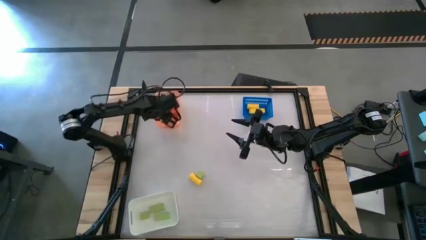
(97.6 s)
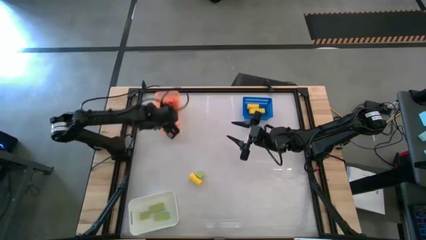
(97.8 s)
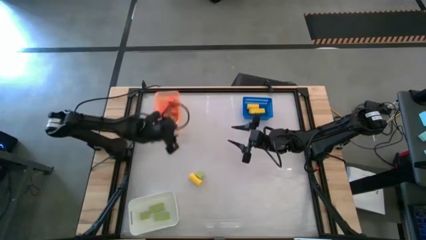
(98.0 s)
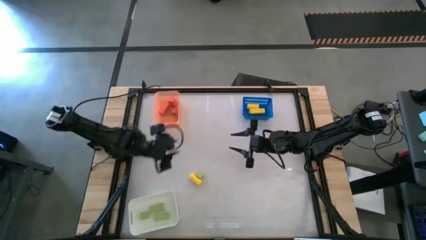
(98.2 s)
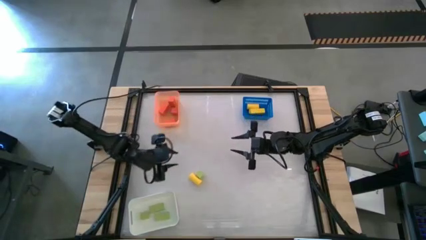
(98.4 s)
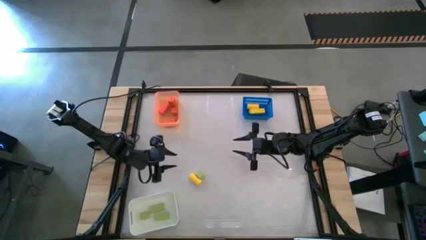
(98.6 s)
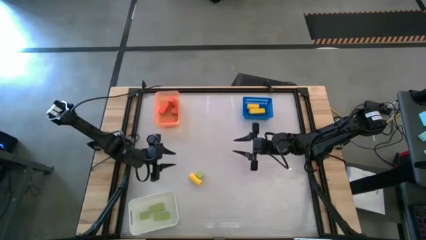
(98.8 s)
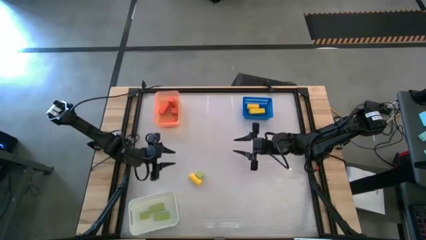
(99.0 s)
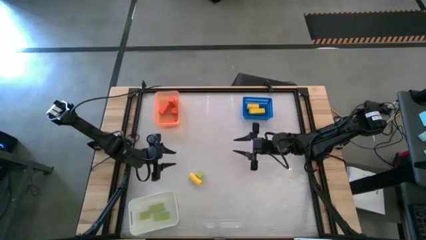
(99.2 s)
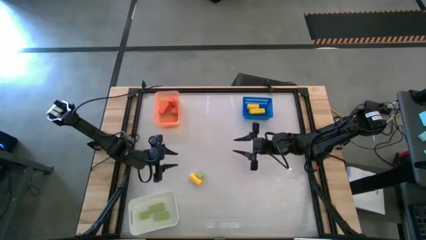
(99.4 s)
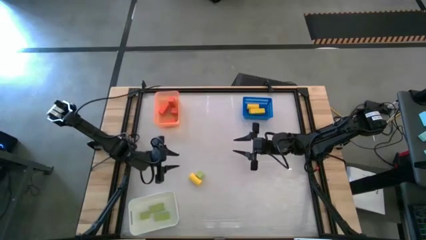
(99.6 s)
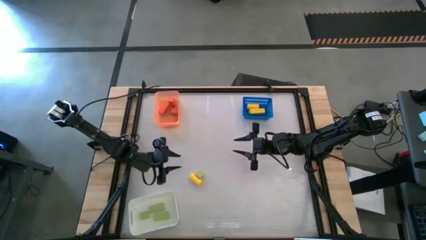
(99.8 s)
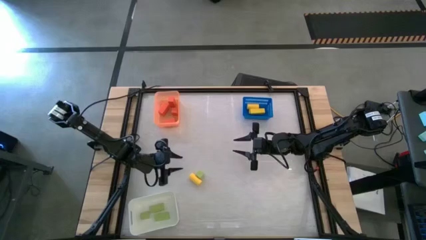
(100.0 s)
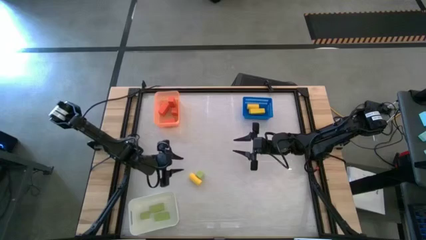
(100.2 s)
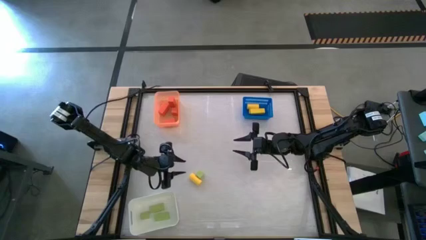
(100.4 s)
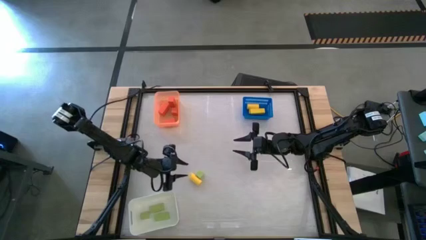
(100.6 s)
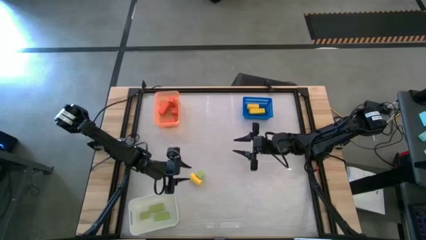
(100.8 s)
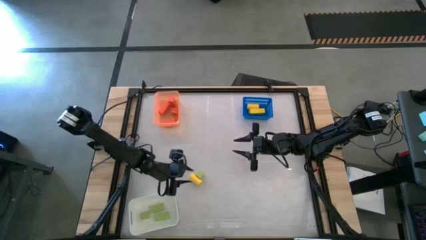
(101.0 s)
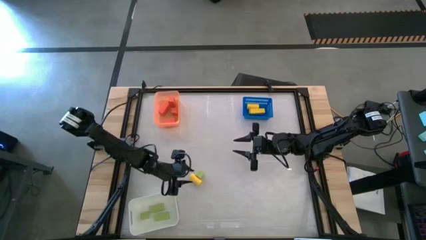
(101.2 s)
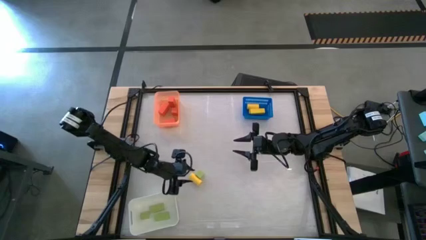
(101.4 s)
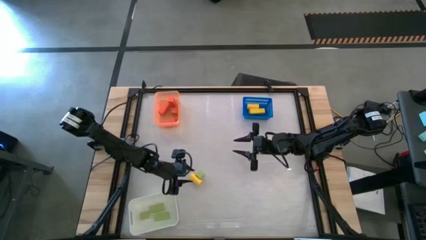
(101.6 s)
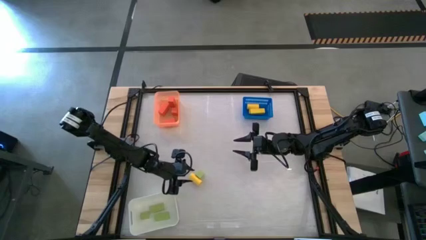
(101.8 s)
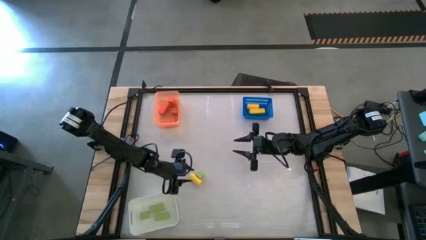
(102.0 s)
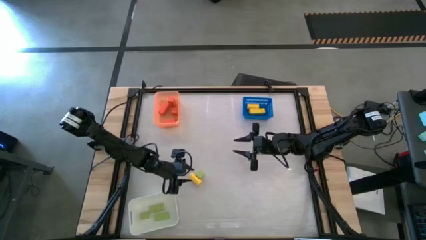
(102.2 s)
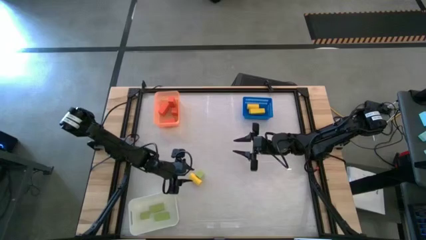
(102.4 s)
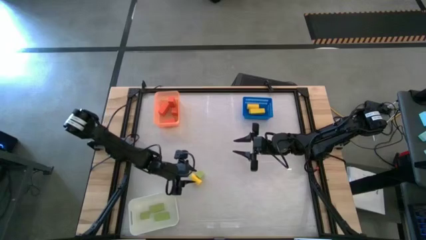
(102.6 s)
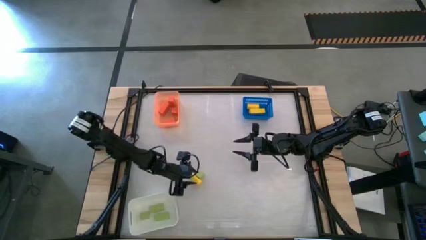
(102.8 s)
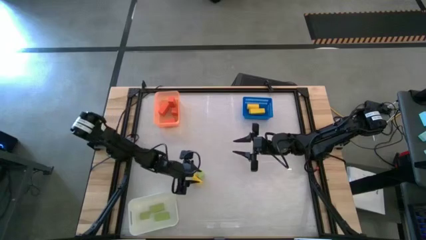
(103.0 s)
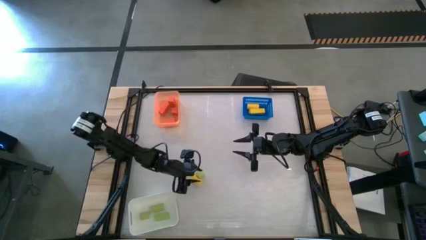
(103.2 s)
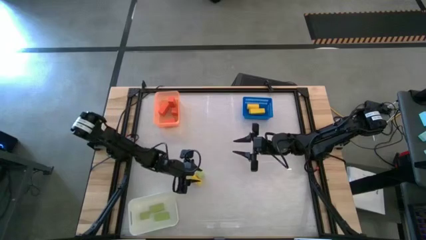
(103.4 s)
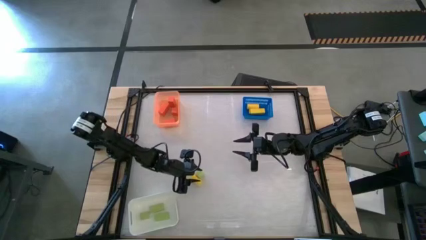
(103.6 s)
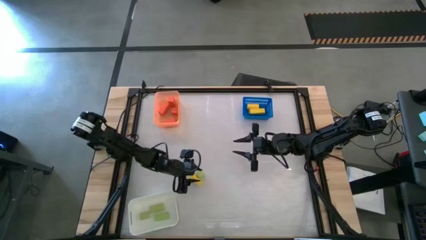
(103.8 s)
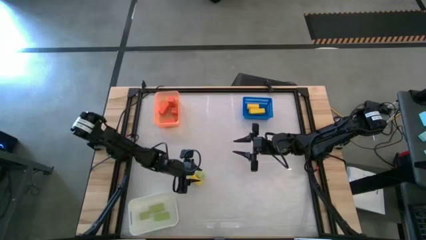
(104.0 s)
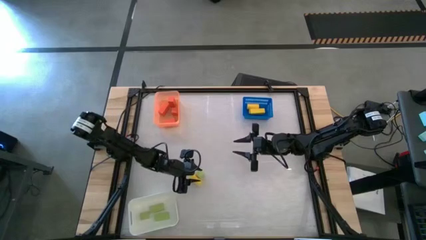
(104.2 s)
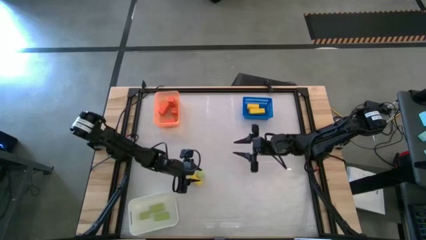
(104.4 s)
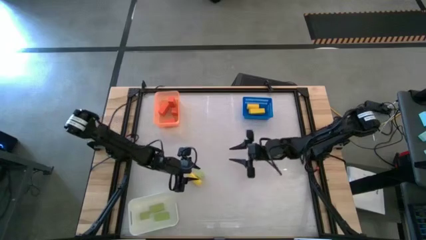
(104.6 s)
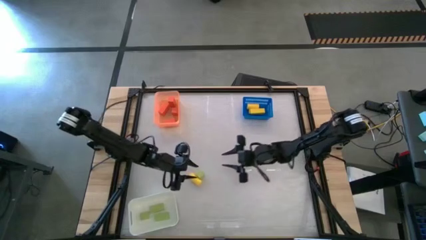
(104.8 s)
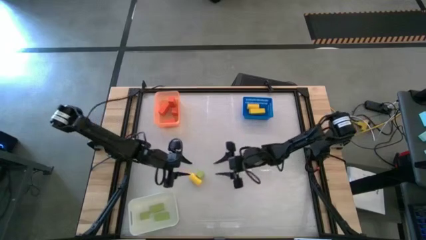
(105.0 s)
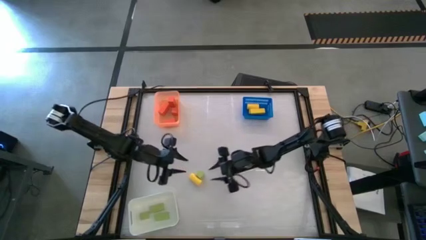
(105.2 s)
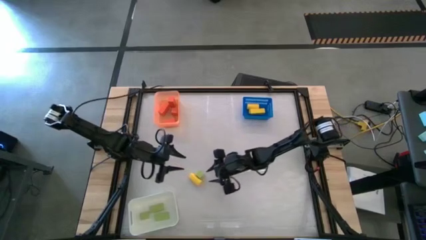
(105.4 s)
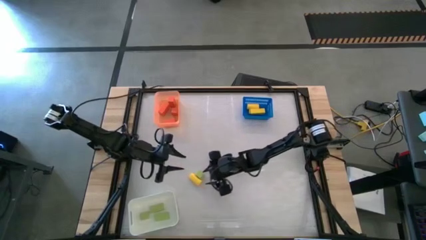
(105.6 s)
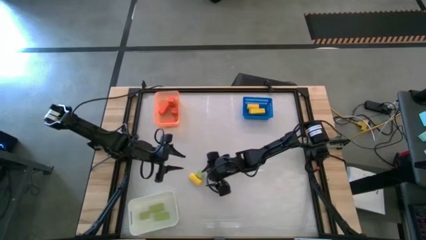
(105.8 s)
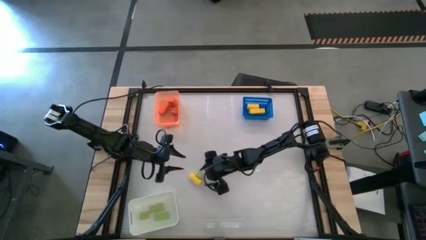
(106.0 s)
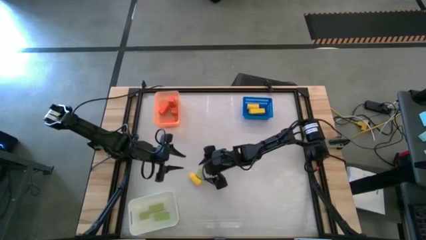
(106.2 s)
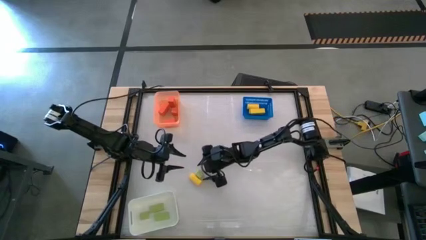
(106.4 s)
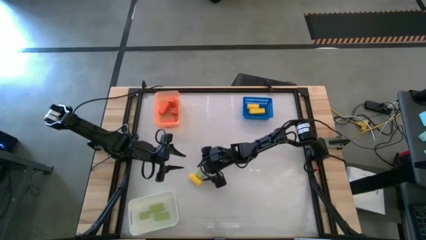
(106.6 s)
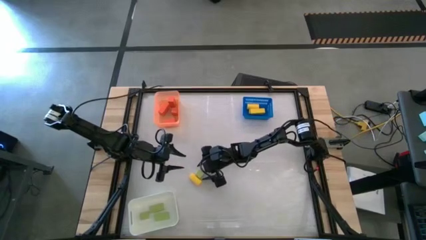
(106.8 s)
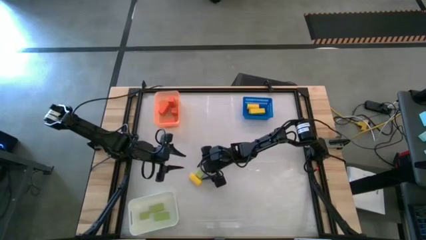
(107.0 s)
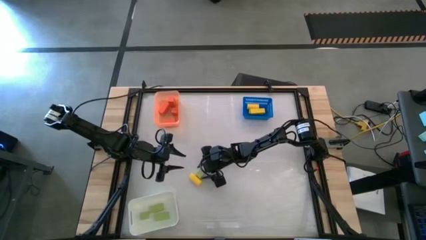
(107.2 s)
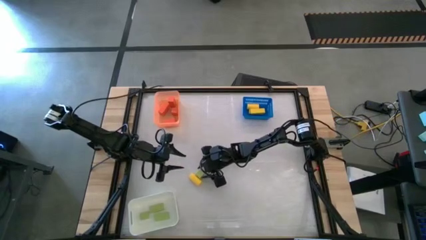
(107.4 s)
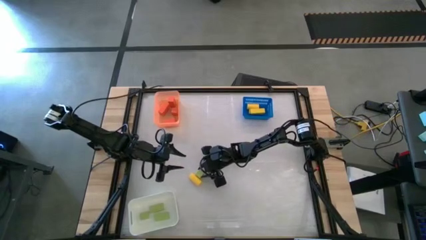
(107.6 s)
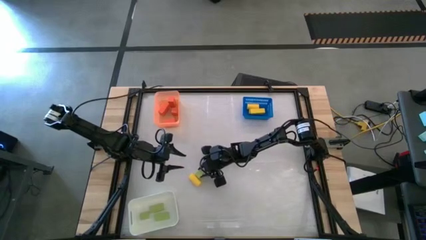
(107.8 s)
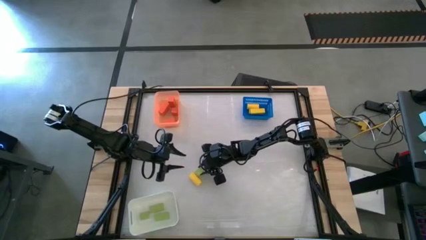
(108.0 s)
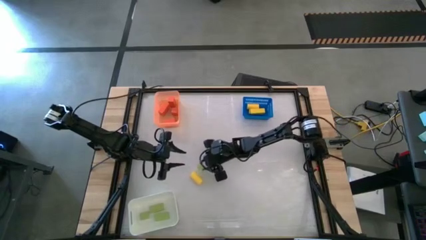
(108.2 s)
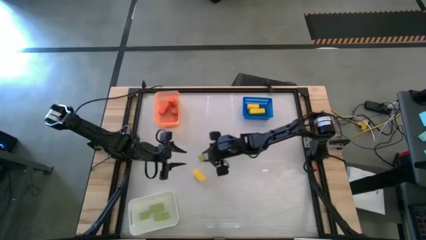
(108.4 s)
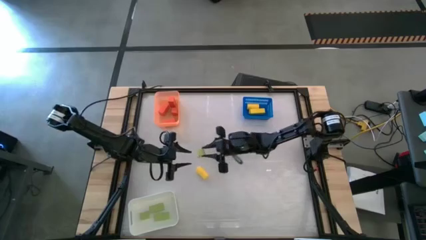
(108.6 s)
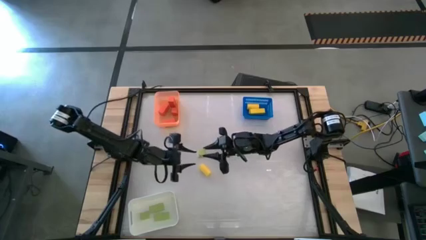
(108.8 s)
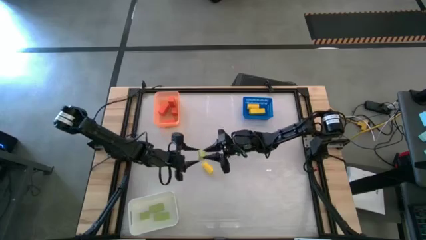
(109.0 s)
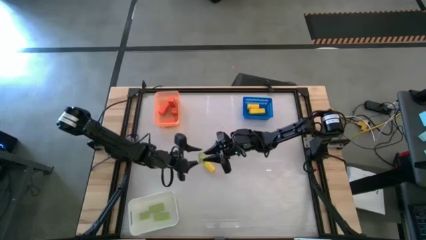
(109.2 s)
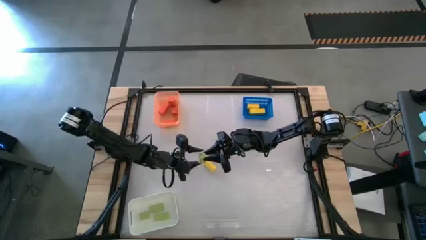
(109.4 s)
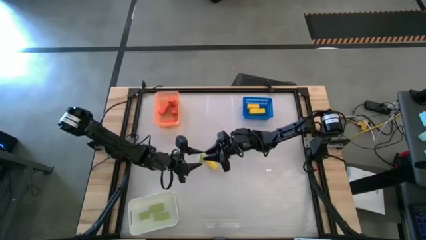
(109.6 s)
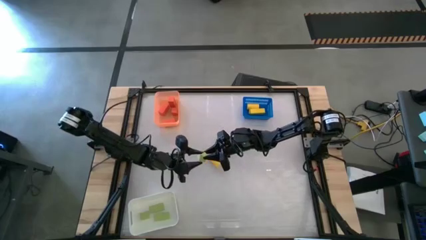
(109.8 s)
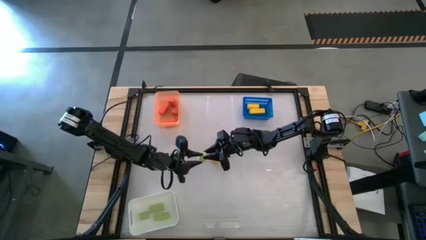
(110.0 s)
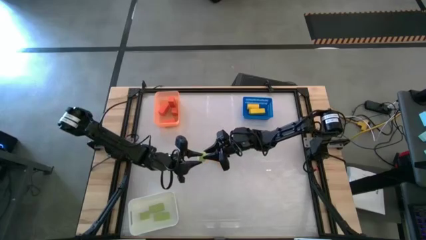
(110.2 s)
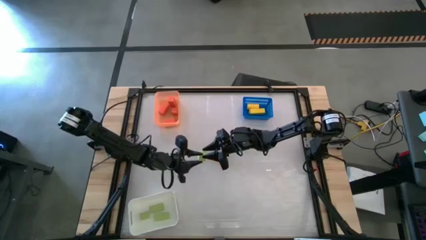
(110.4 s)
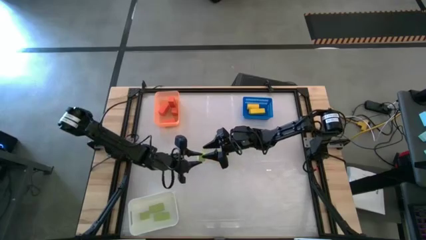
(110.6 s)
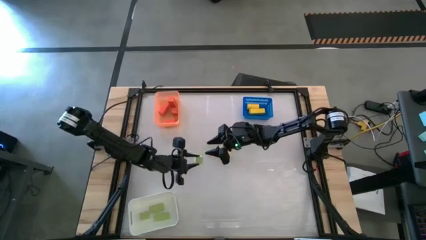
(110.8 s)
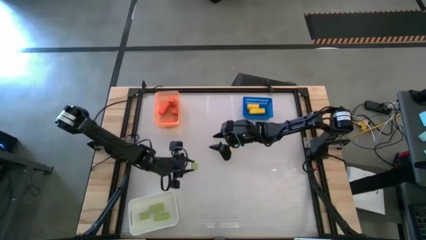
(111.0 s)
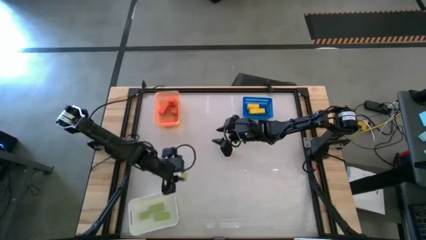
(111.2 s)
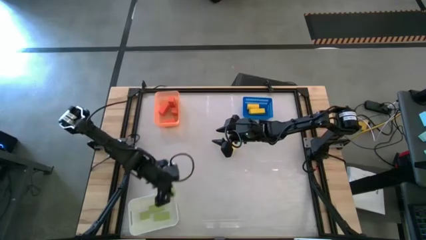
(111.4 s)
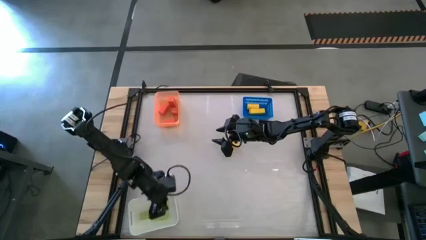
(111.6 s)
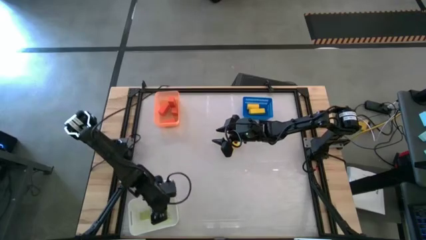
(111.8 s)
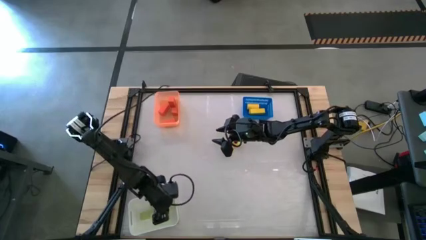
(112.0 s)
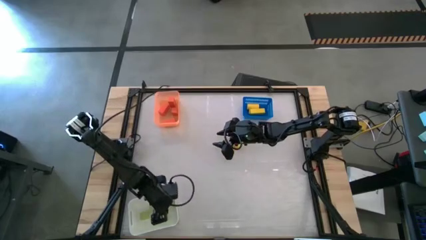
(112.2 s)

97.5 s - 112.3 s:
Task: Sort & place blocks by color
Put the green wooden block into the white bin

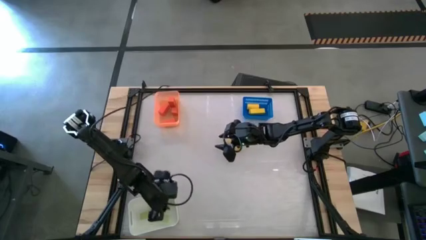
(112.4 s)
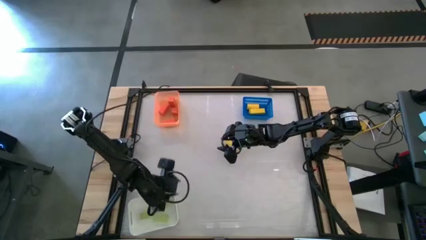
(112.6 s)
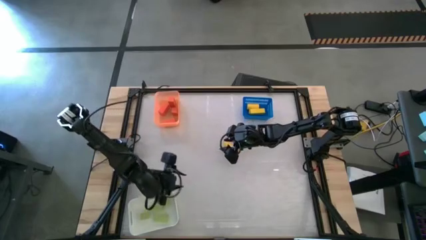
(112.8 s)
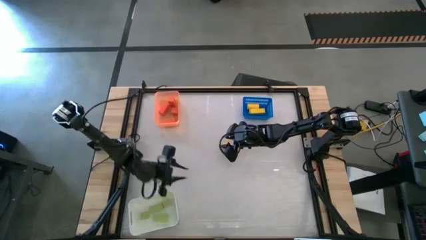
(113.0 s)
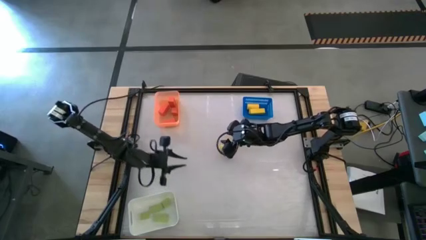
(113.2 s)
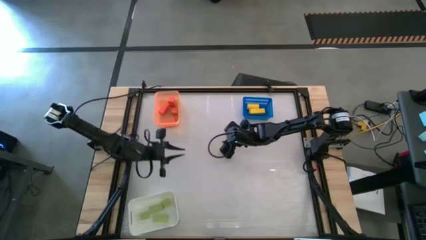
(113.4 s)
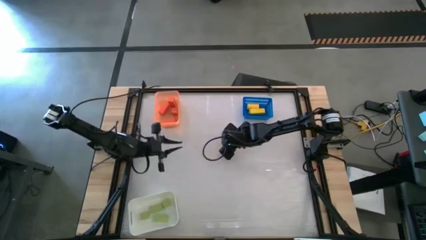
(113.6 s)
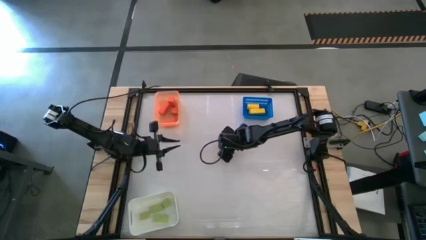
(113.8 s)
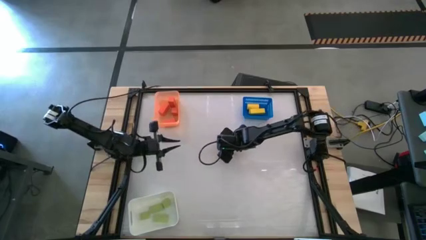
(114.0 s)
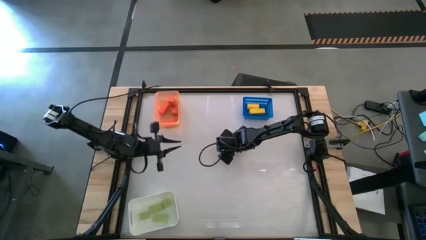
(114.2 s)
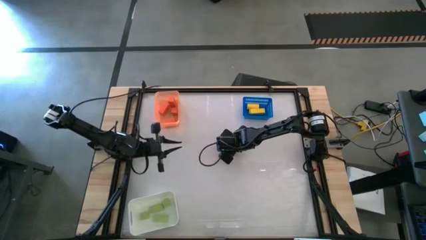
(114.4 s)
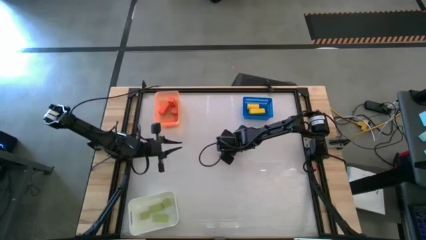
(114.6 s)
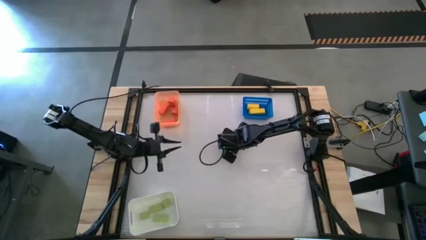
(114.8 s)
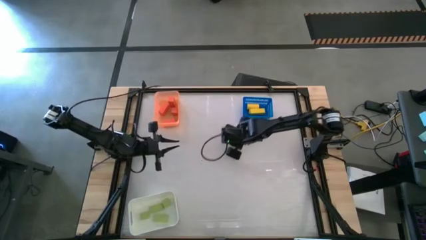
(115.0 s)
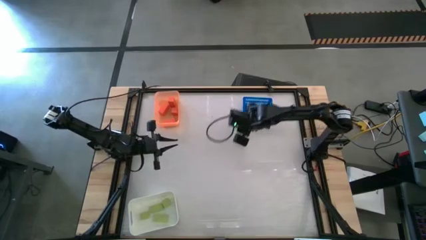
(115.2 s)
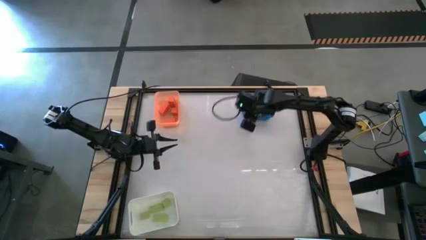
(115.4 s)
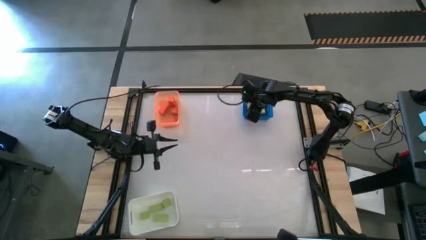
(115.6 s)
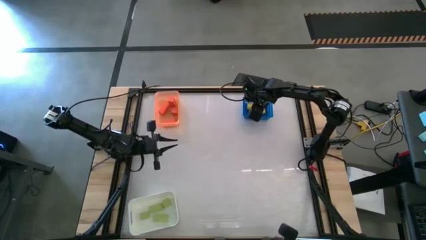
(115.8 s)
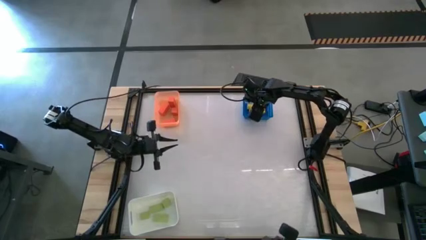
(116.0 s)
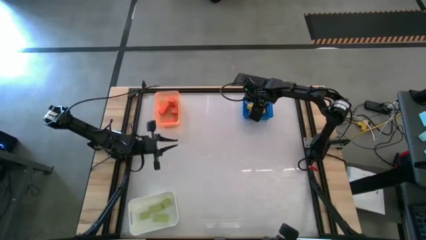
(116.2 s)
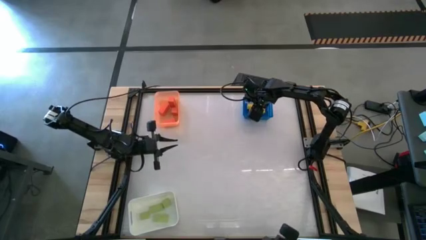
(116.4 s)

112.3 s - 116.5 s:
Put the yellow wooden block into the blue basket
